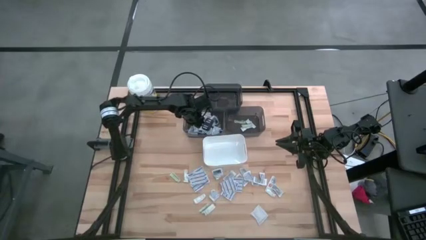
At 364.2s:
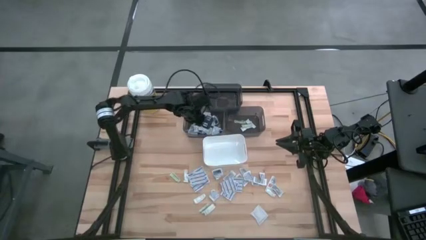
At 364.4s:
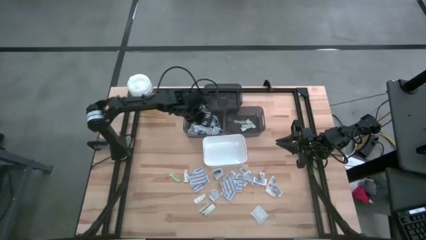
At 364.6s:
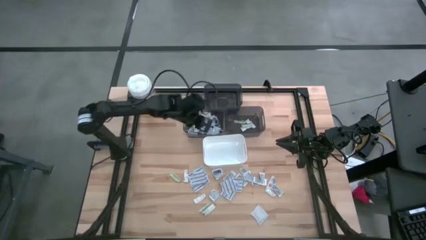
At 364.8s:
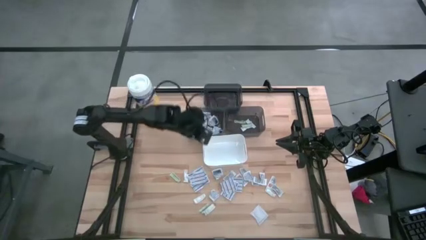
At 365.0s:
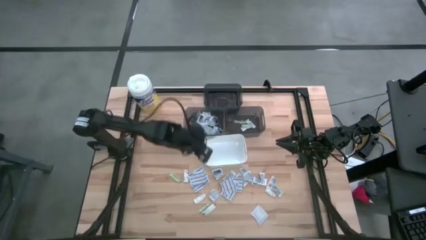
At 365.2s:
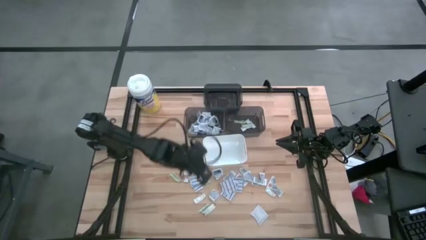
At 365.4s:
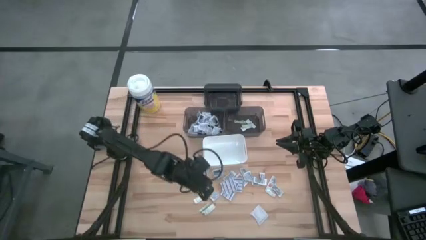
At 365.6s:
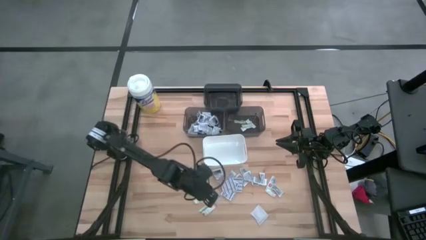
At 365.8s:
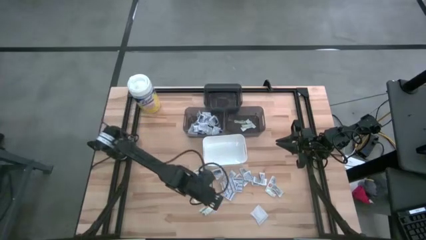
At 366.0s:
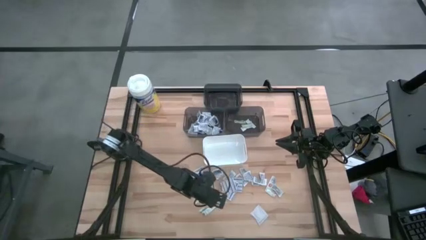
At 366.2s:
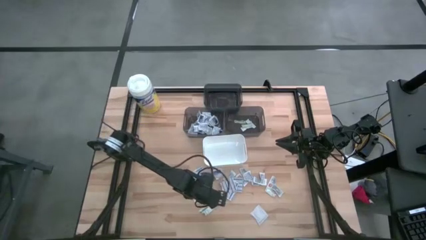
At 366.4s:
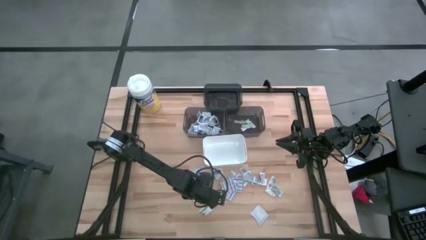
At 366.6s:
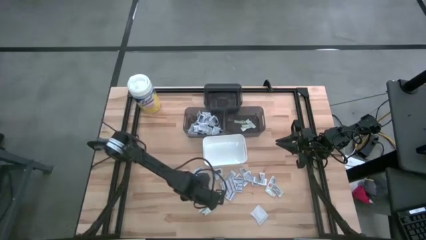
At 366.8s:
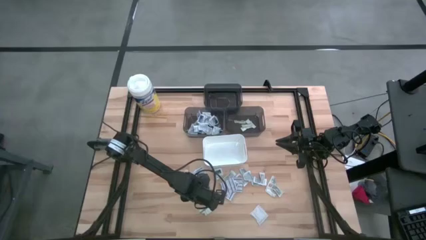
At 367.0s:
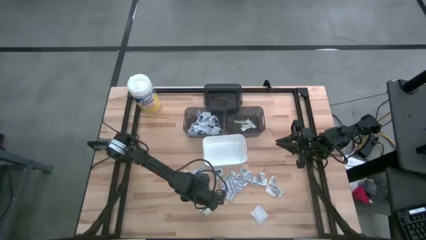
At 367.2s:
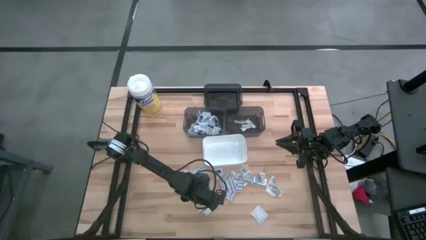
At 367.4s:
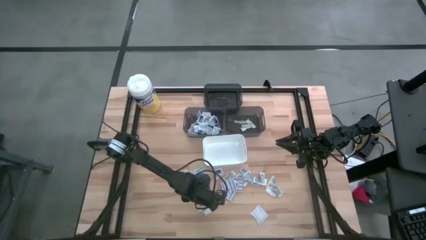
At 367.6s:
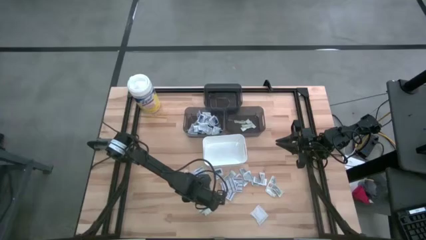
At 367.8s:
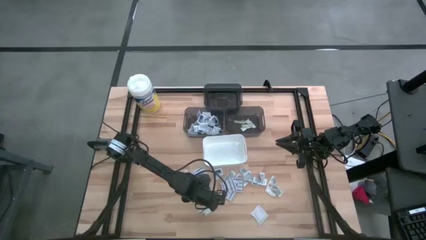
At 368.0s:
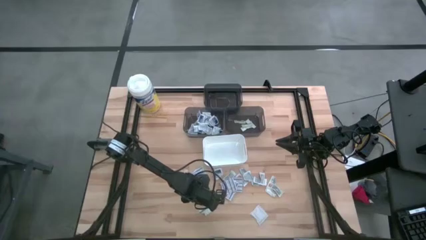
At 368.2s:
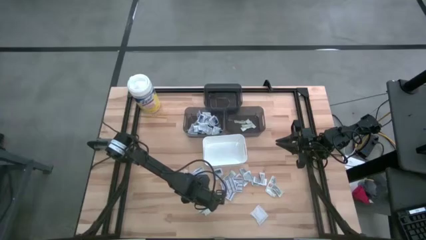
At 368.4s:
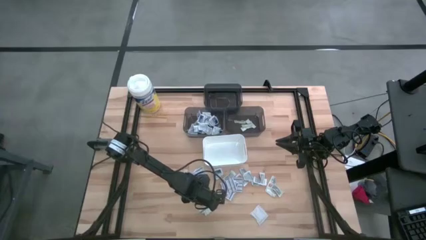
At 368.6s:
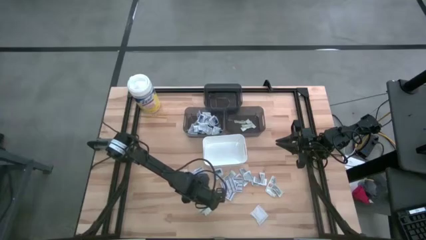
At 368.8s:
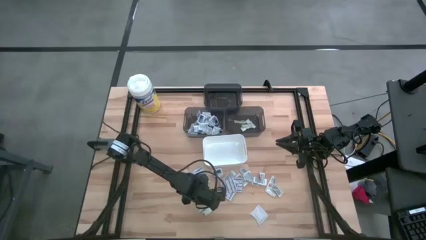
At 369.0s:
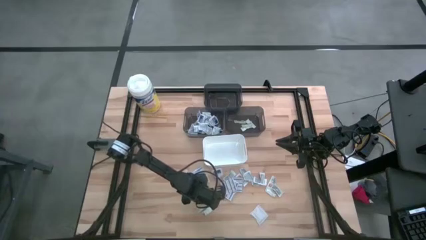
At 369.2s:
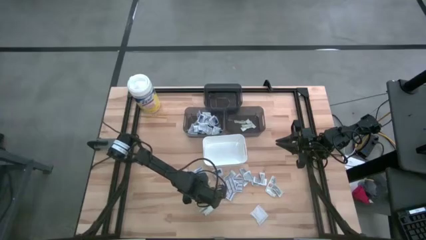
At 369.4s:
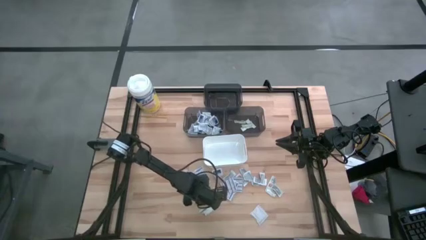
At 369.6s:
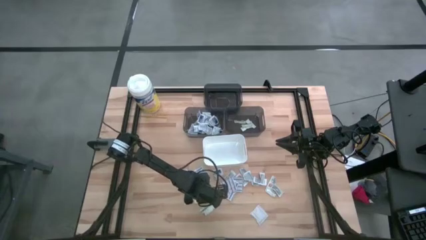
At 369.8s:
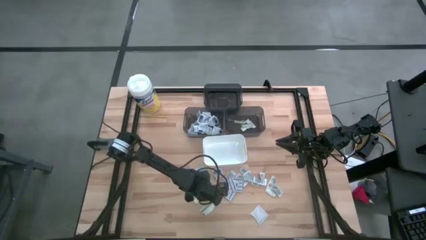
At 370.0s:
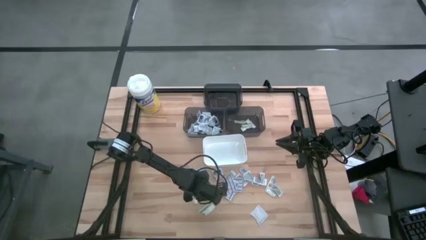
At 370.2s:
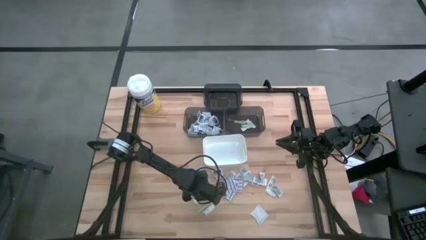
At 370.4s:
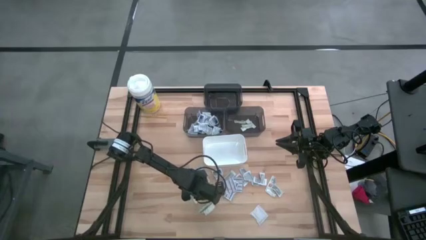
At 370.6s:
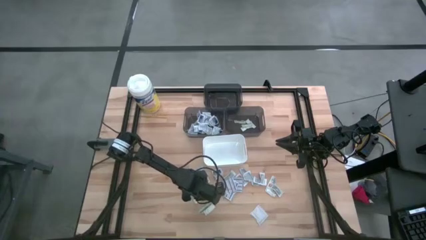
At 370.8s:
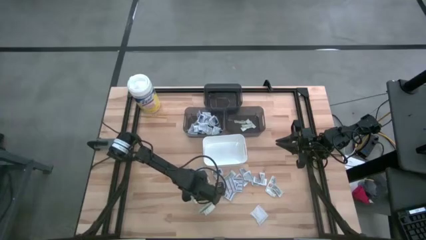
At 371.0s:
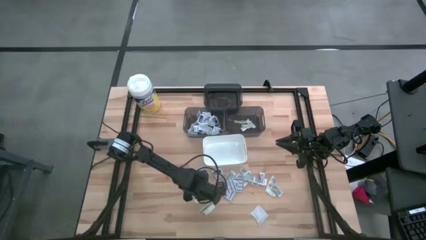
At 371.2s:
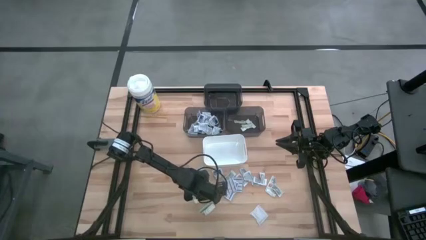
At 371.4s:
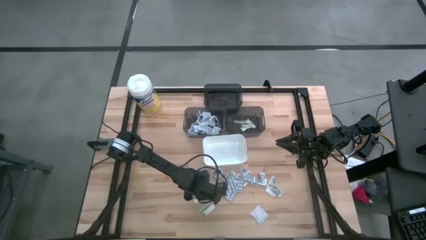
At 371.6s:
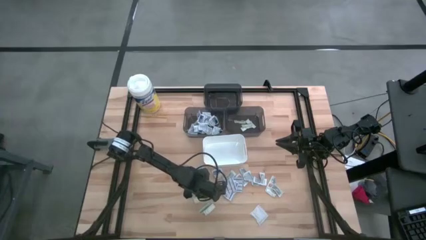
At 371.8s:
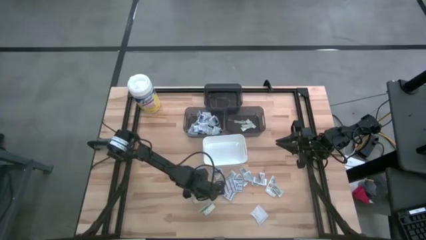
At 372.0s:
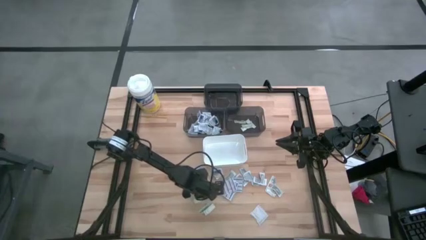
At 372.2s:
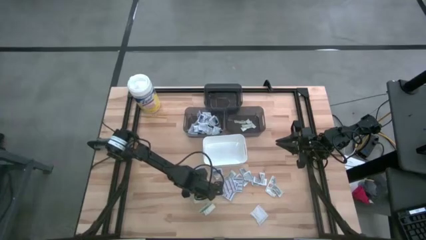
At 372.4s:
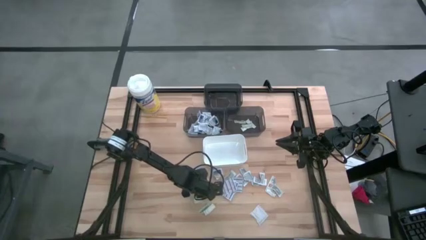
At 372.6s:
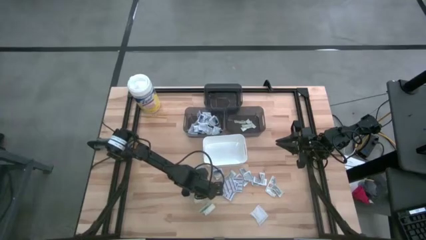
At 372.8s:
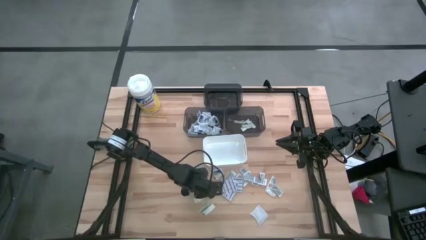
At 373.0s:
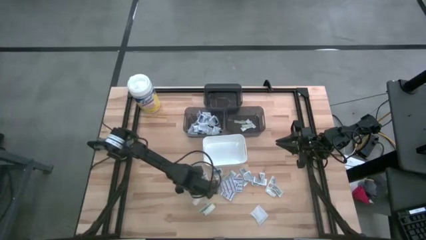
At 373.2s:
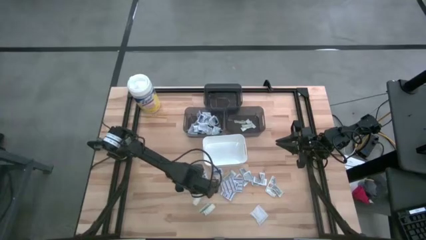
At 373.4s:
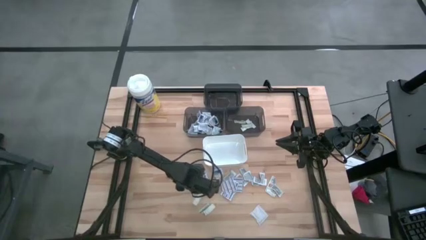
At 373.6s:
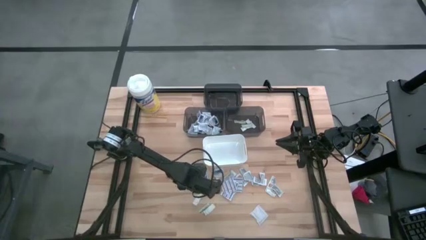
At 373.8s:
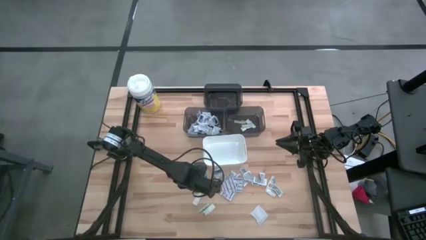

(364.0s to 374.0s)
Task: Pick & Place First Aid Supplies
Put the alcohol pad into the bottom left black bin

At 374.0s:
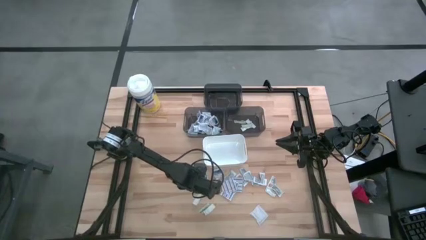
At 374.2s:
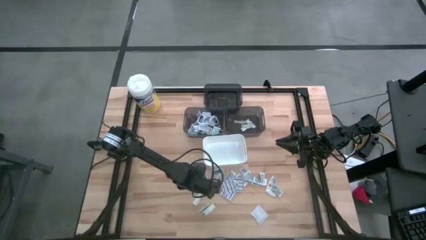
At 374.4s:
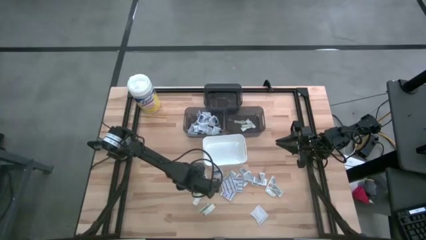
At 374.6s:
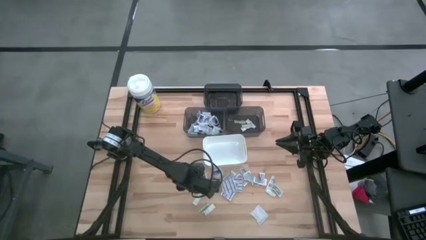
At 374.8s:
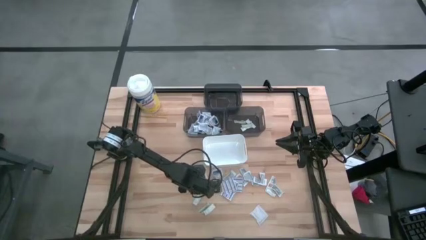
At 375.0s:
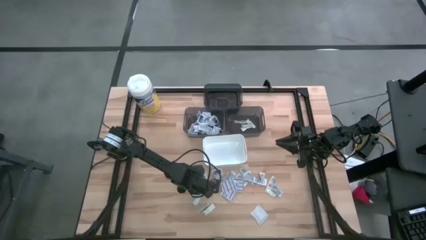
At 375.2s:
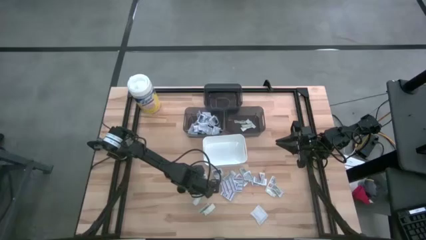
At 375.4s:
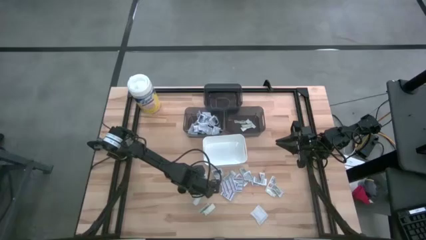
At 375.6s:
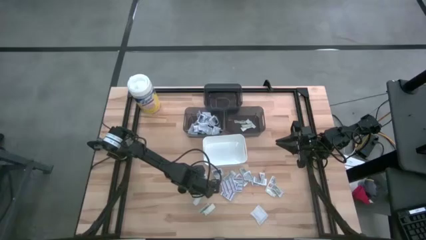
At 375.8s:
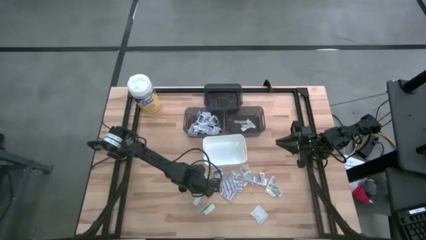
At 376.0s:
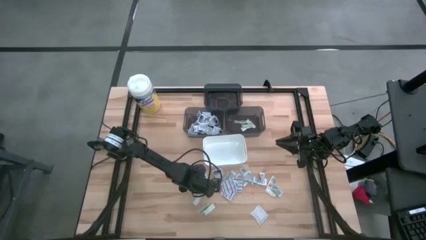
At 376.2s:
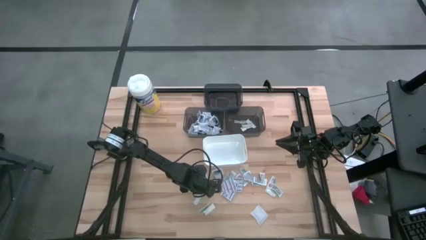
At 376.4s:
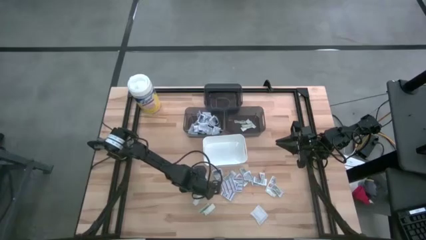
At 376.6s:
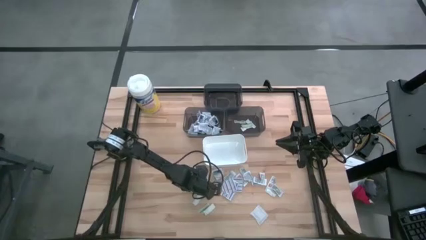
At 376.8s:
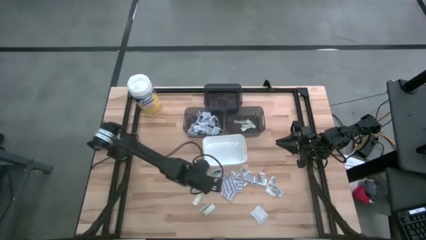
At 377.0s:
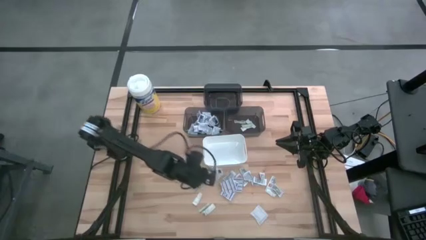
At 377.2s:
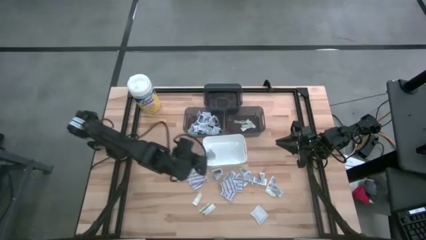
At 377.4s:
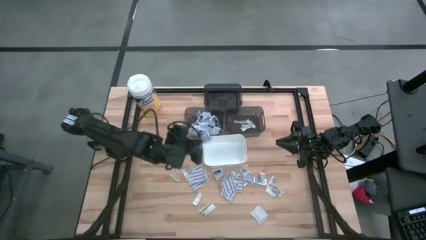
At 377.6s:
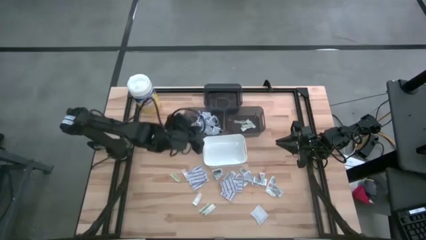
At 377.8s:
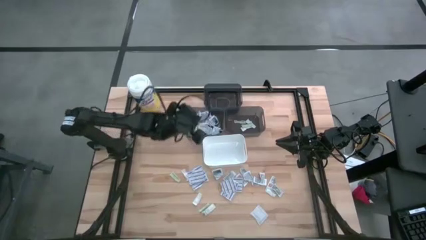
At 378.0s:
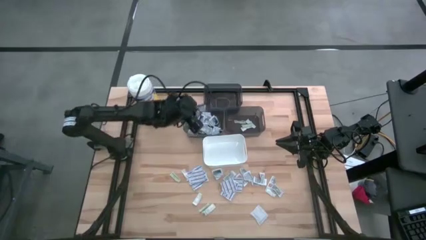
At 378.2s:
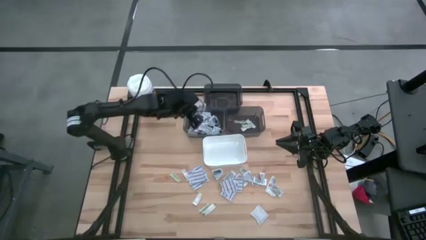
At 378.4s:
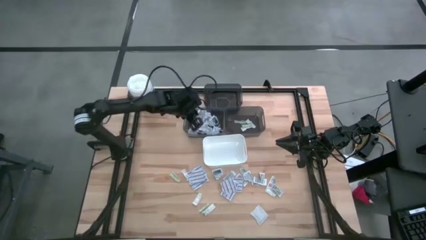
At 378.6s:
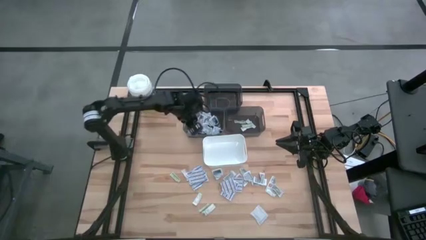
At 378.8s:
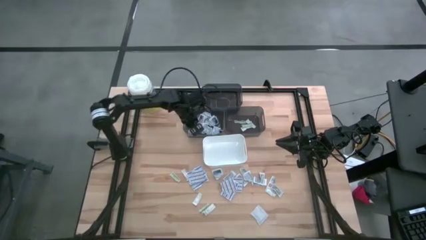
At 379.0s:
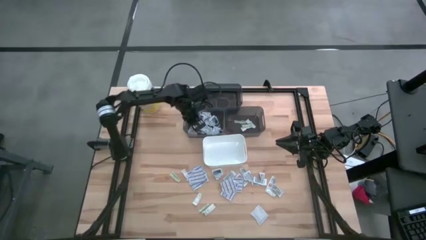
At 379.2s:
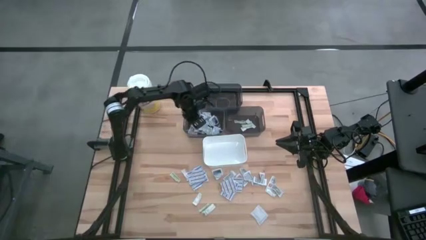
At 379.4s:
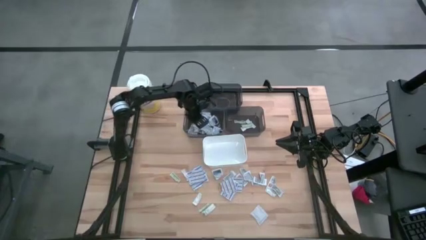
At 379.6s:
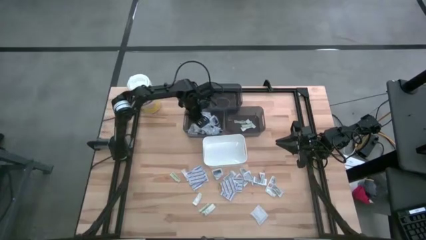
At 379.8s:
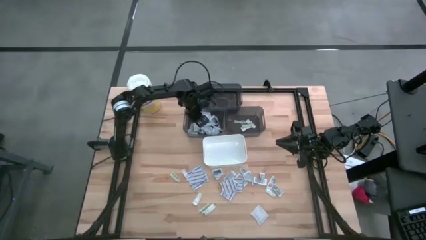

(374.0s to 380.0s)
Put the alcohol pad into the bottom left black bin
